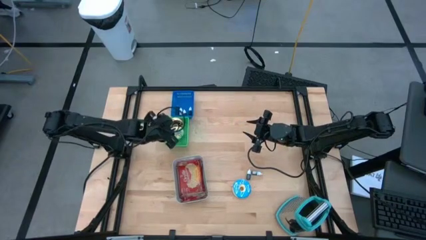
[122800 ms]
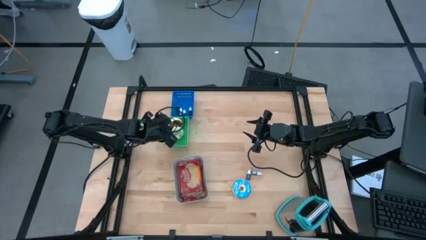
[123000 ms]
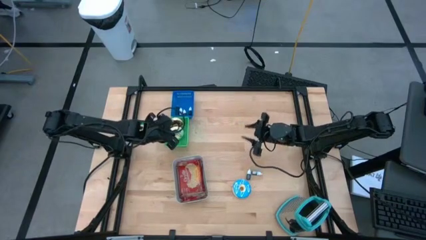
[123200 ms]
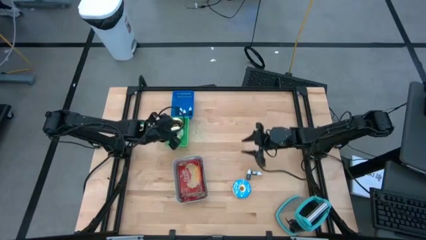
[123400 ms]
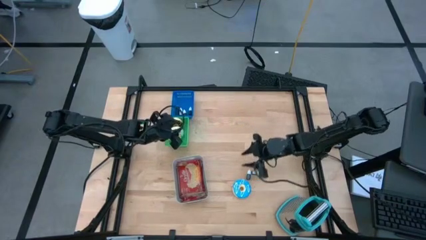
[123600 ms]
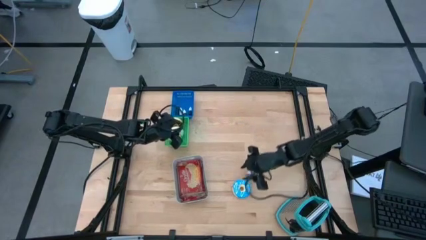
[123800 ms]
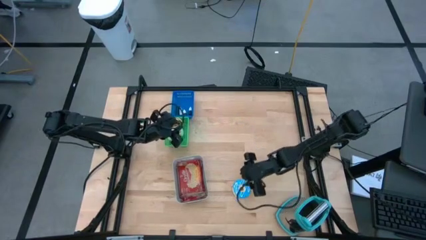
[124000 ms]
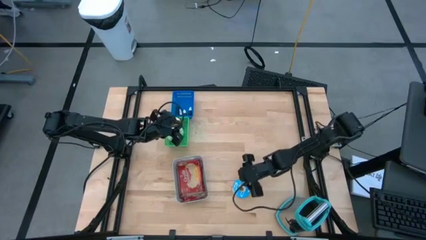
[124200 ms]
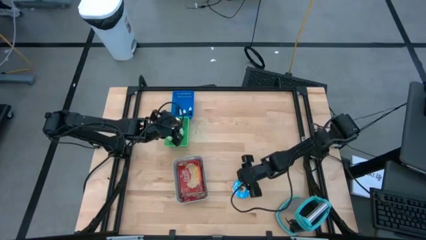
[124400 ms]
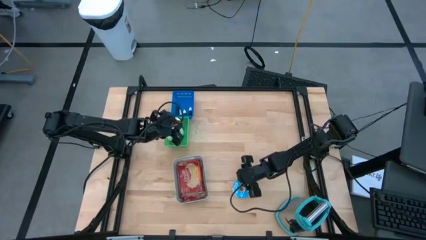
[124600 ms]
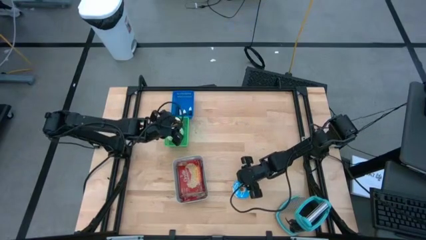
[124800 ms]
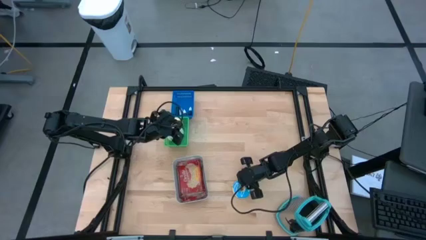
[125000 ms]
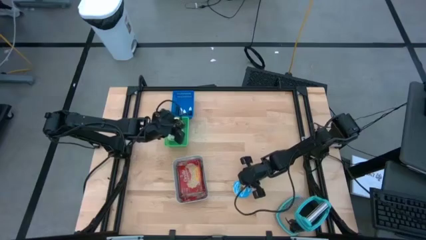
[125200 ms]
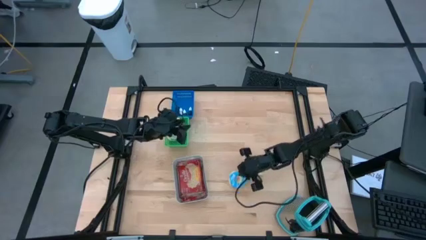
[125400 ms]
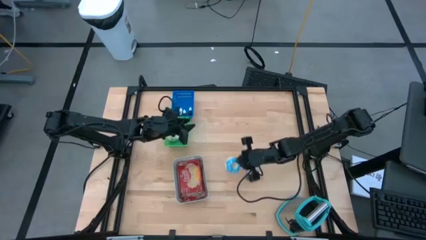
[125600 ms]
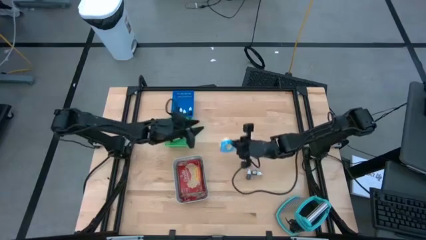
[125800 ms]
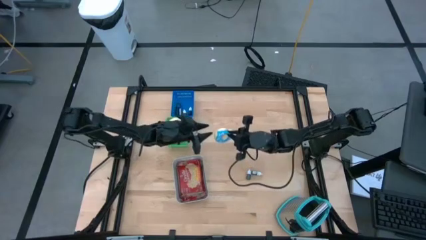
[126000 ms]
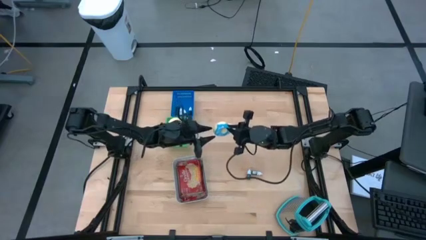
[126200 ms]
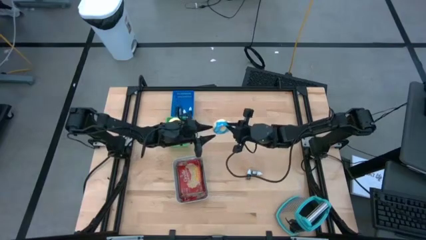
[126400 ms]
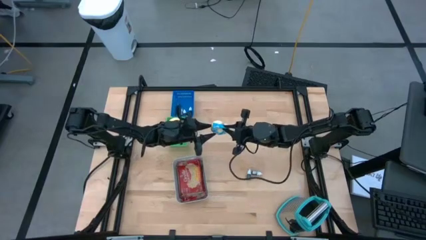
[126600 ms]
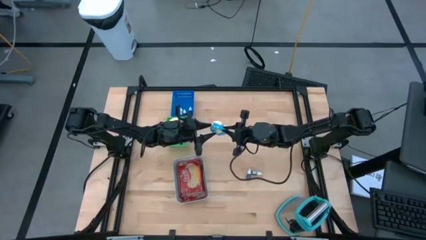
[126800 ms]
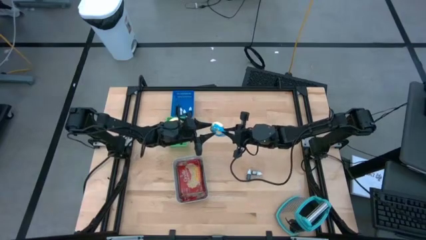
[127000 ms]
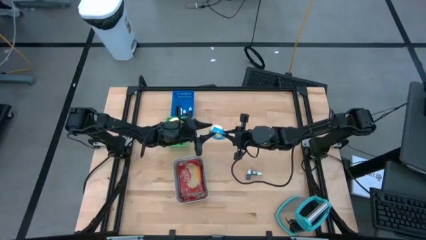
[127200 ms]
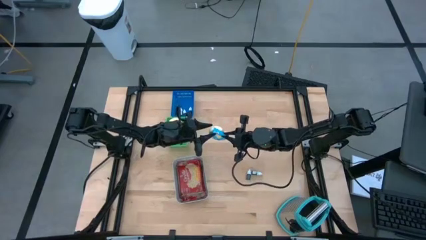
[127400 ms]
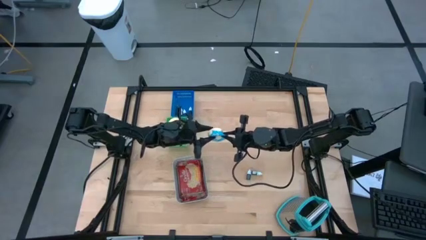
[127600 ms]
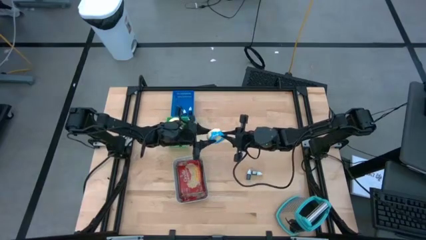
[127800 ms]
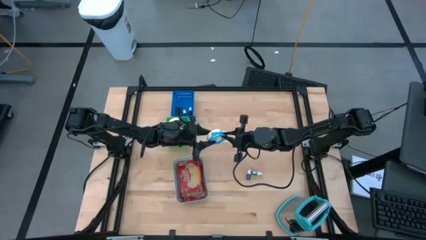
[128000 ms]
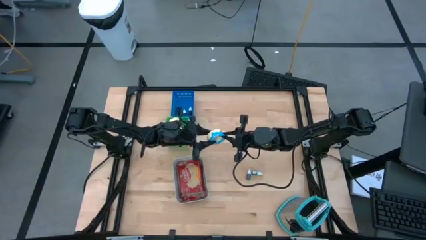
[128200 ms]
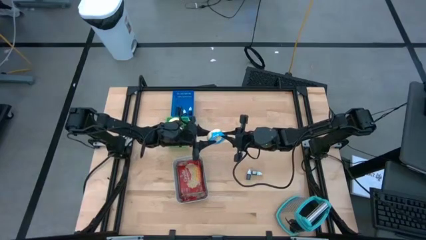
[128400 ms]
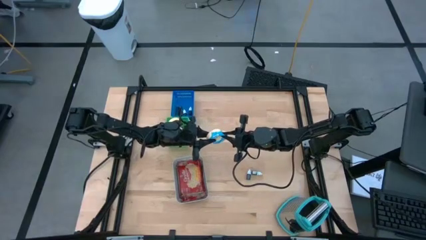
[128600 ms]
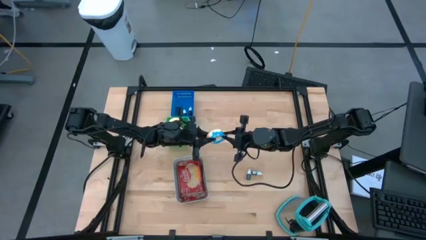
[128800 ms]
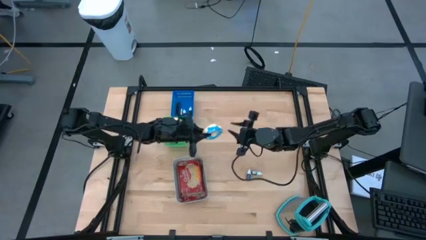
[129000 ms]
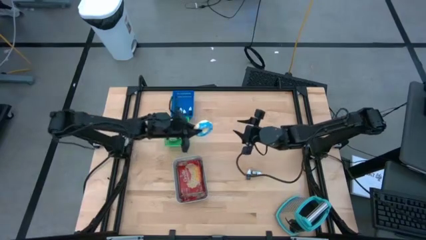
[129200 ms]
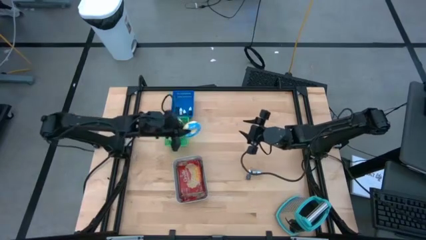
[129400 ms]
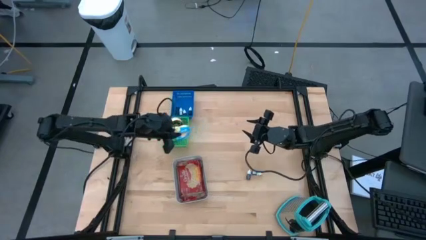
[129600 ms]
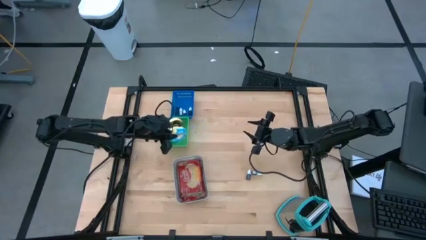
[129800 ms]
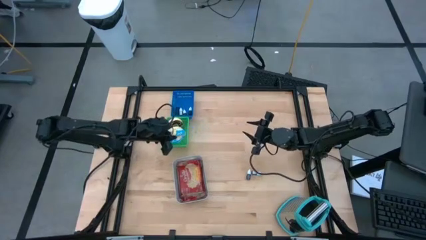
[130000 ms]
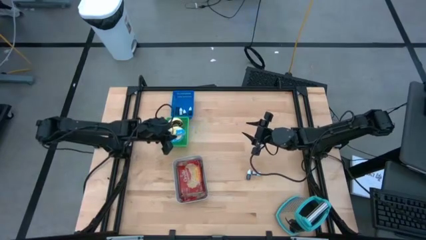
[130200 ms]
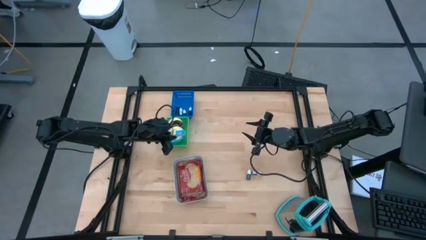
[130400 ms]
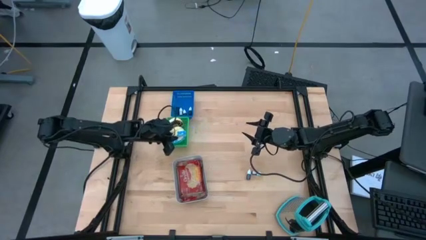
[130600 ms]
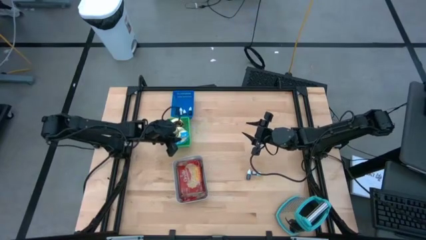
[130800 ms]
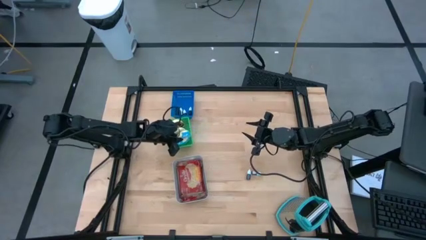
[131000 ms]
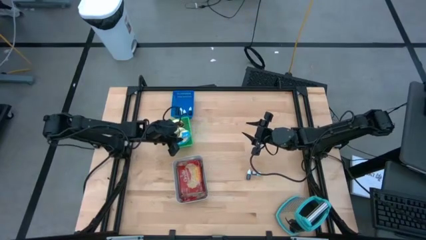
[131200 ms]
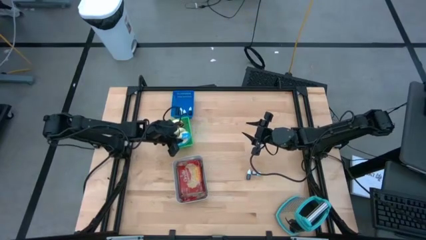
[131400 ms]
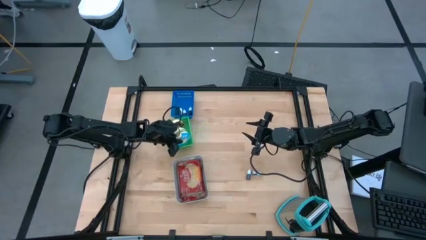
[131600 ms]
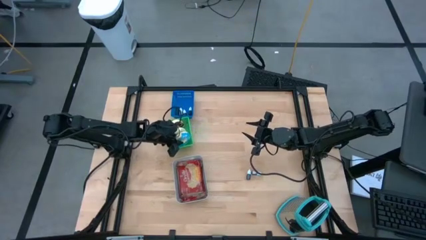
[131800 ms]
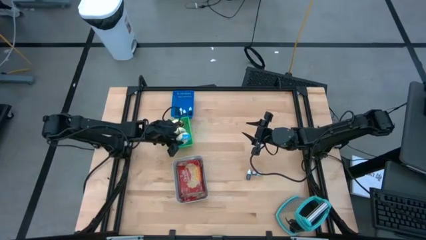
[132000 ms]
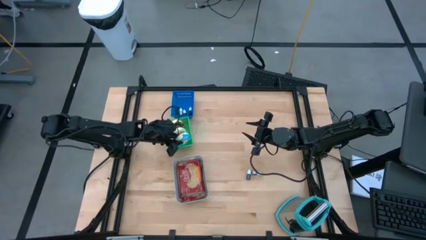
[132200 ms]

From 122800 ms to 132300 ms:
Task: Pick & Place Food Item
Put the blue donut into the green bin

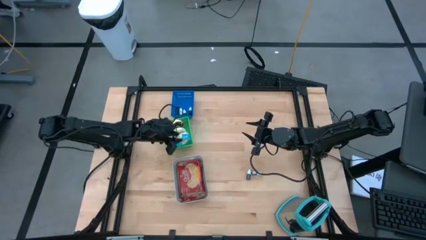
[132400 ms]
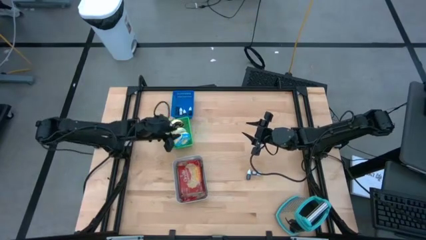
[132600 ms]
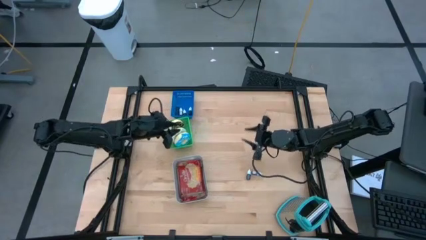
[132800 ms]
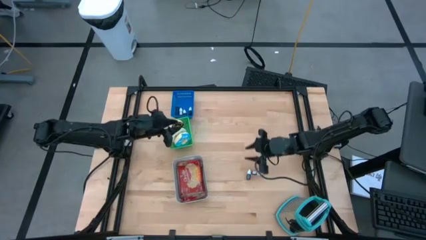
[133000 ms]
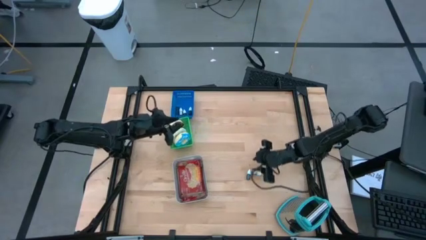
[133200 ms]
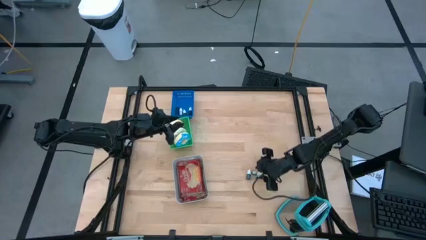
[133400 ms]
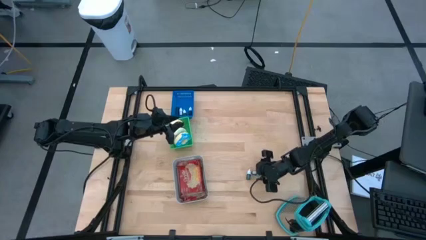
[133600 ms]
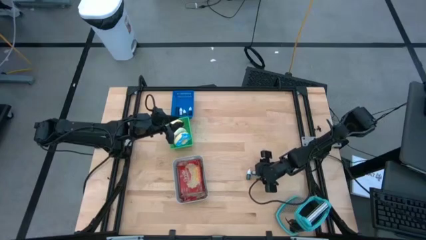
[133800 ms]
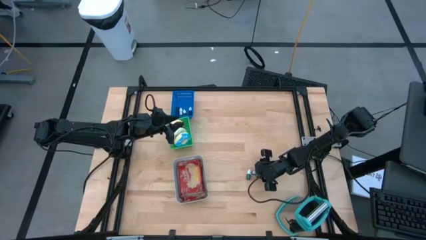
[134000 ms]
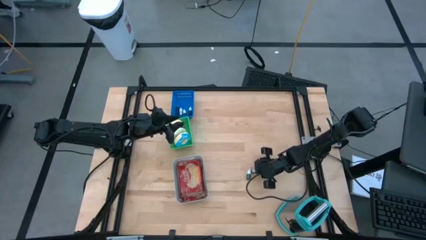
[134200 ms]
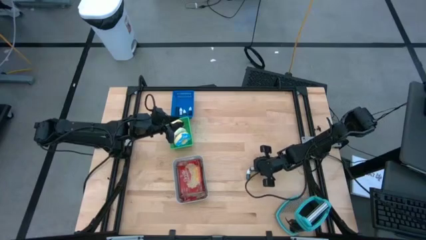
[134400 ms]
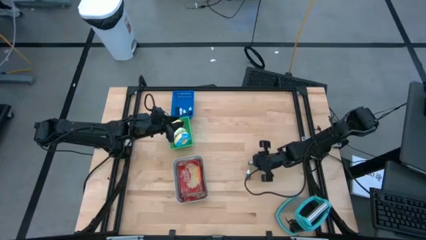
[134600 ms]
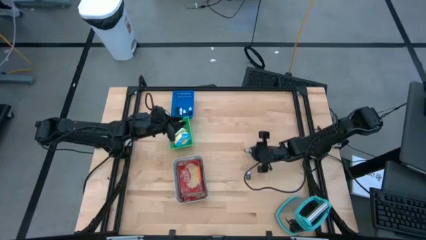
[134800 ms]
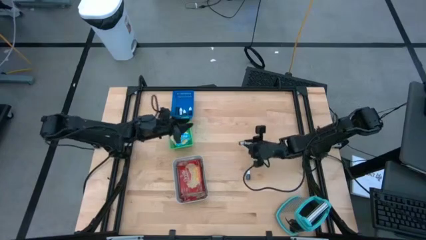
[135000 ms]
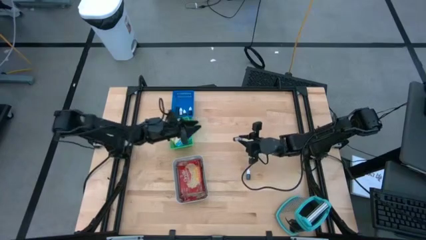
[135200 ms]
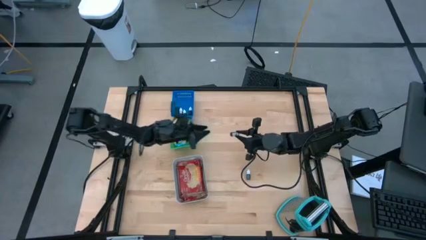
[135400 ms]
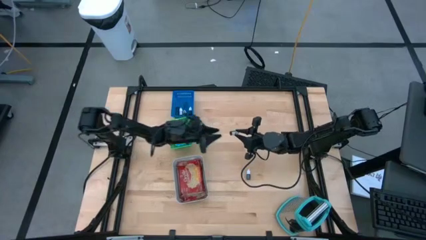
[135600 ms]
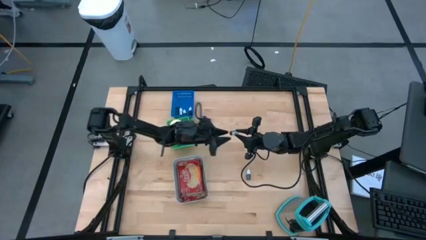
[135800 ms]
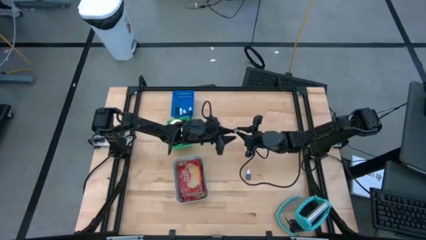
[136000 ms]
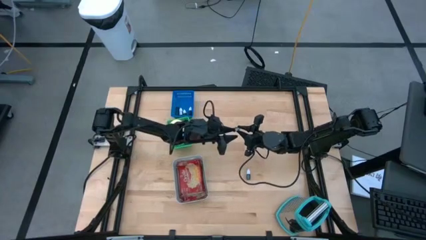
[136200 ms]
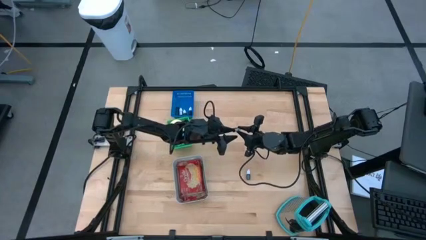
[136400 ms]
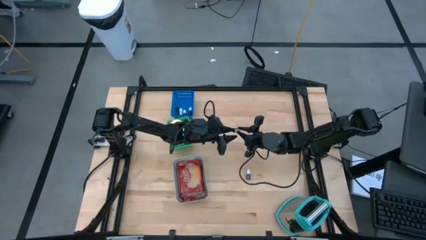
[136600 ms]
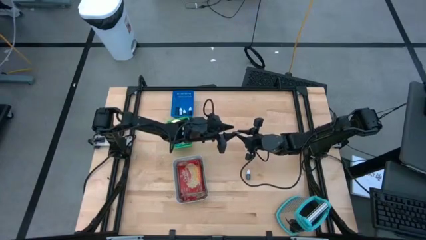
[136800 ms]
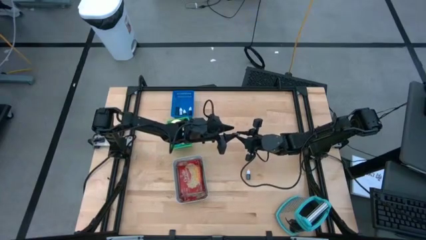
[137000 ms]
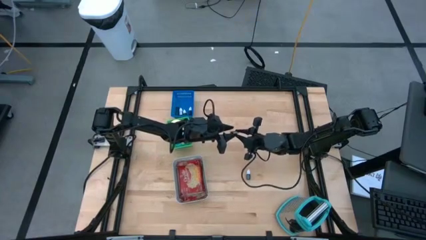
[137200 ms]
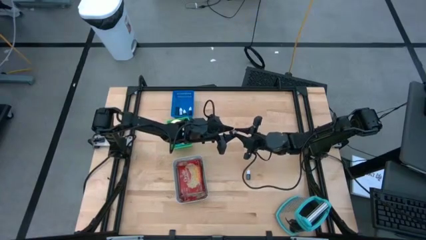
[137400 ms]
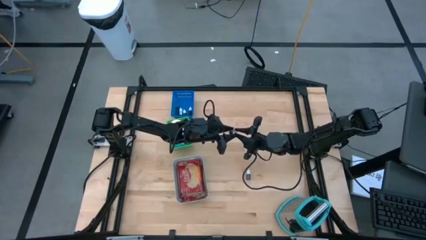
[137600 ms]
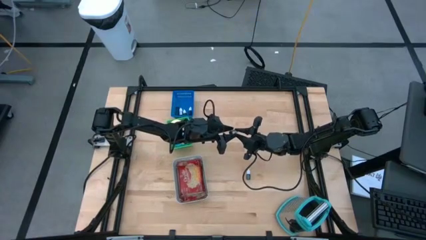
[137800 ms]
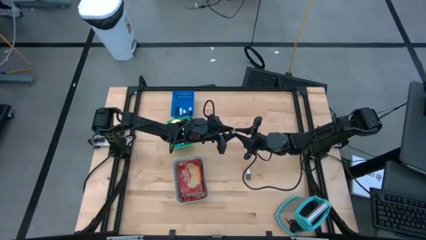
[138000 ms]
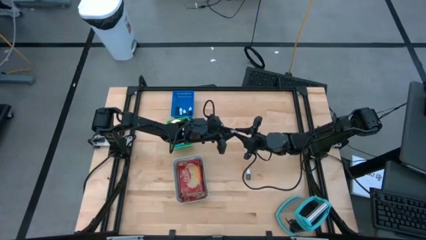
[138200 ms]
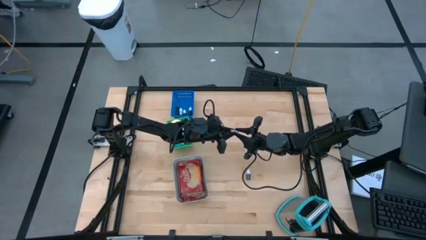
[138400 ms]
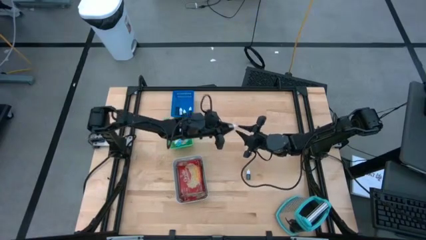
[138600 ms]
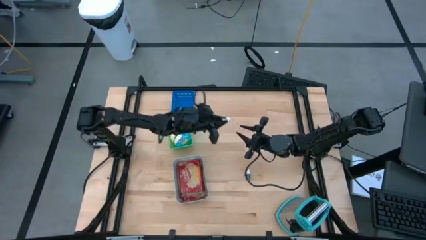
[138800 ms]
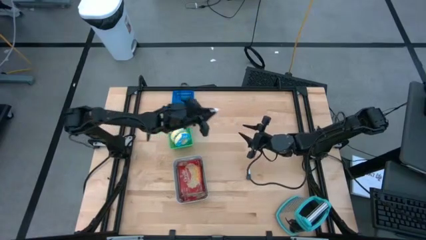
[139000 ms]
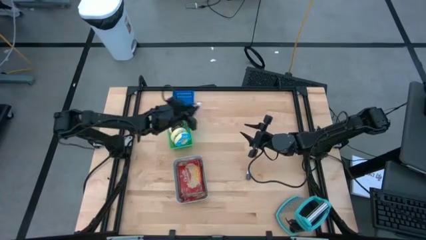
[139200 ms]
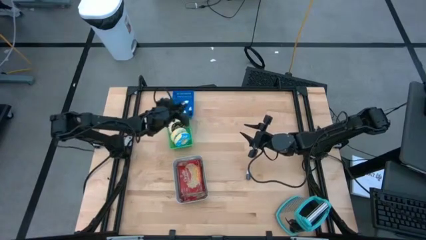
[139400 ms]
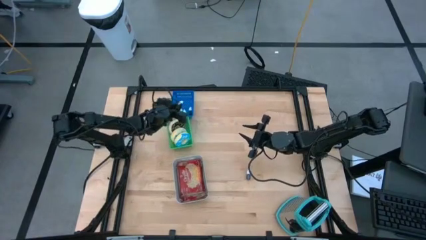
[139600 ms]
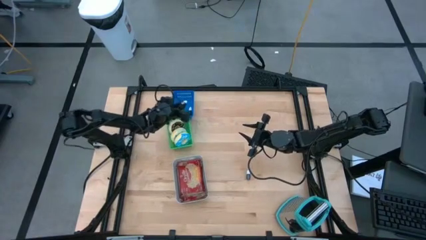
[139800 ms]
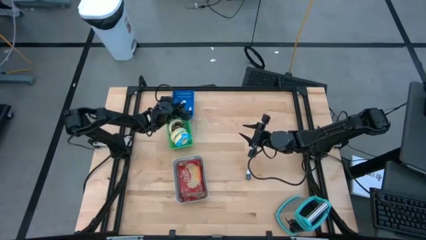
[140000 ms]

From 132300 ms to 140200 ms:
Put the brown food coloring bottle into the blue bin
